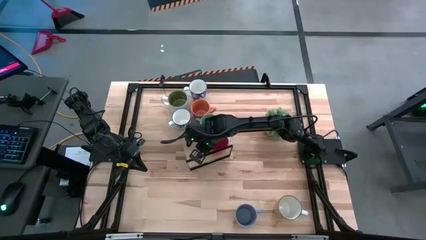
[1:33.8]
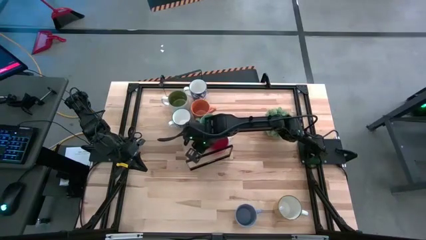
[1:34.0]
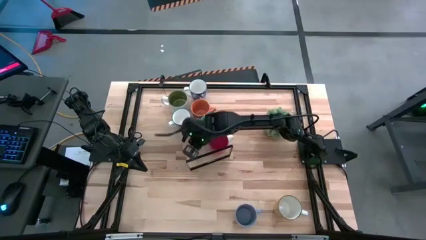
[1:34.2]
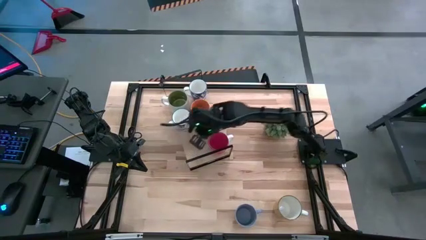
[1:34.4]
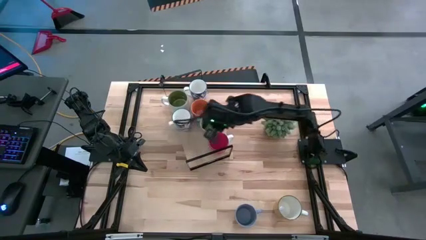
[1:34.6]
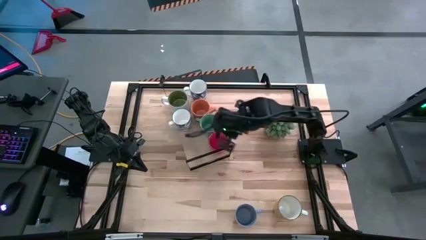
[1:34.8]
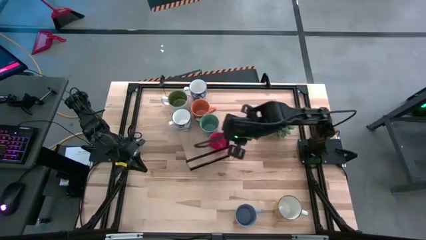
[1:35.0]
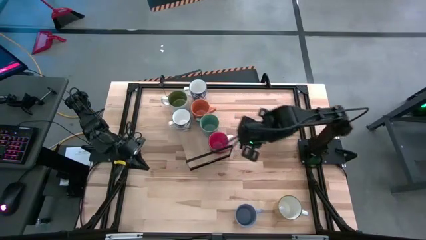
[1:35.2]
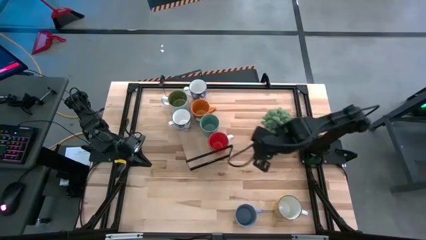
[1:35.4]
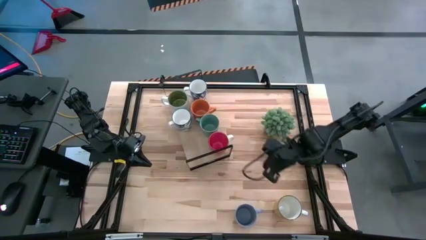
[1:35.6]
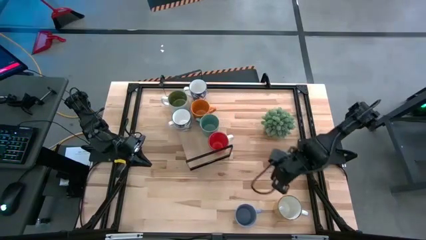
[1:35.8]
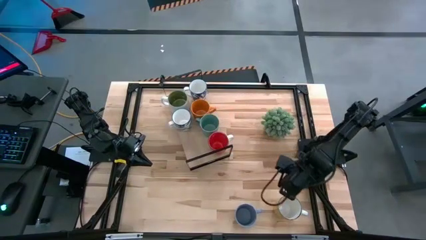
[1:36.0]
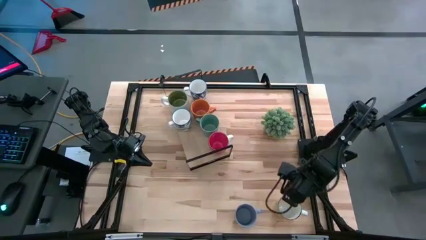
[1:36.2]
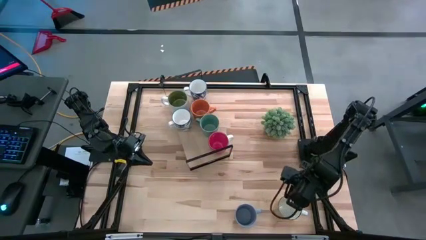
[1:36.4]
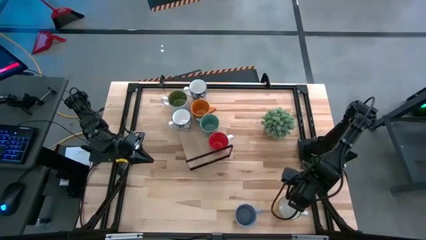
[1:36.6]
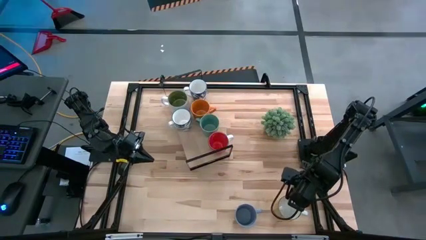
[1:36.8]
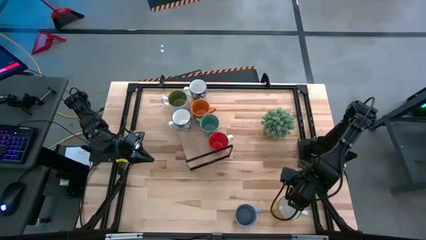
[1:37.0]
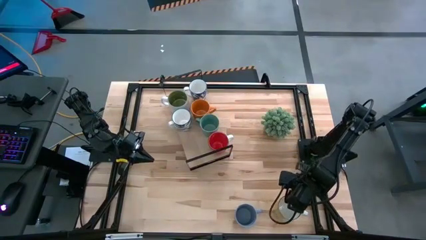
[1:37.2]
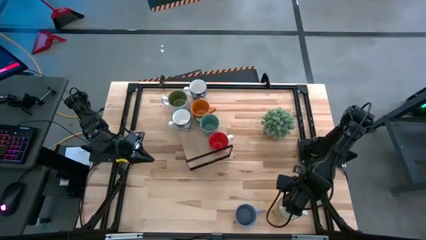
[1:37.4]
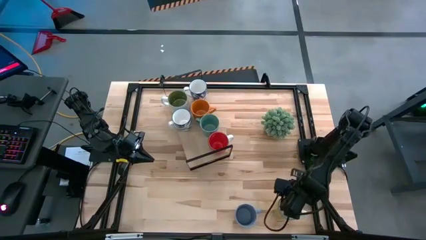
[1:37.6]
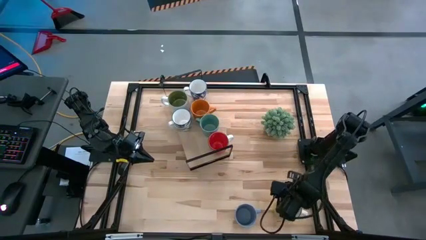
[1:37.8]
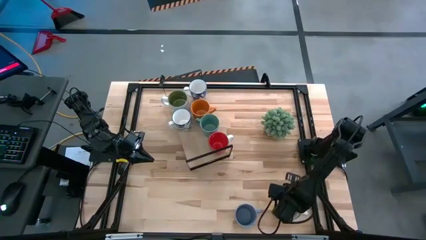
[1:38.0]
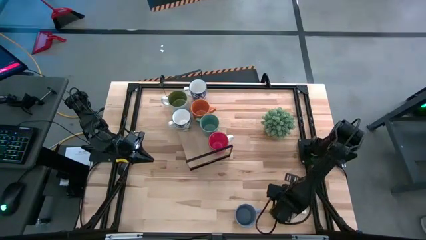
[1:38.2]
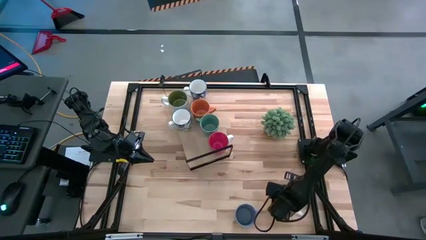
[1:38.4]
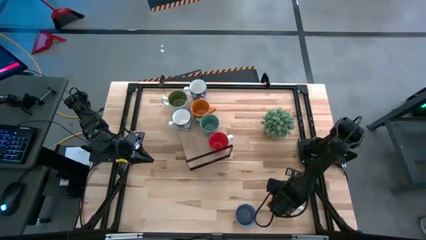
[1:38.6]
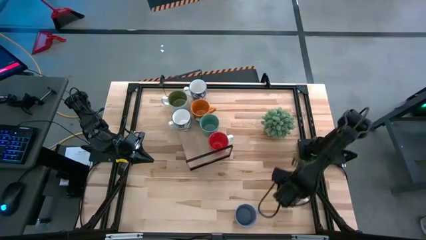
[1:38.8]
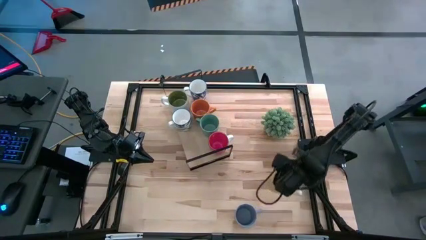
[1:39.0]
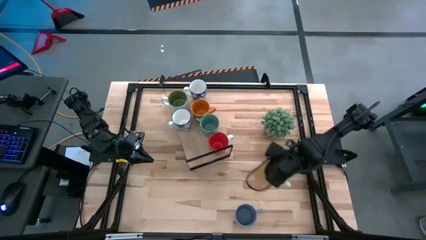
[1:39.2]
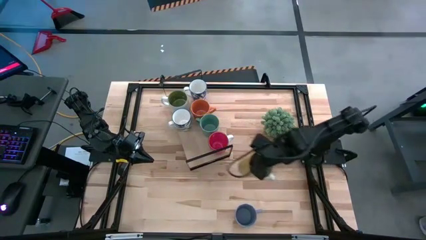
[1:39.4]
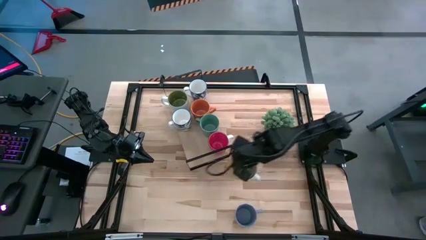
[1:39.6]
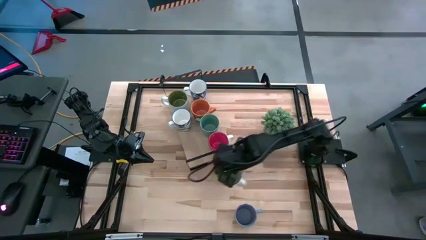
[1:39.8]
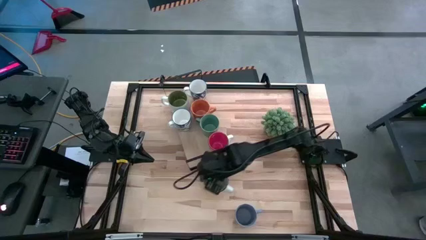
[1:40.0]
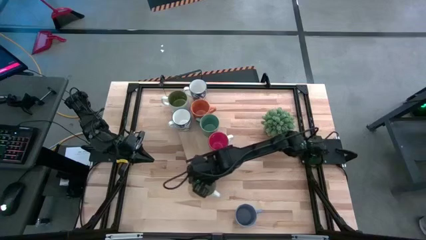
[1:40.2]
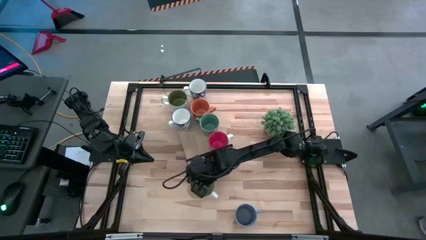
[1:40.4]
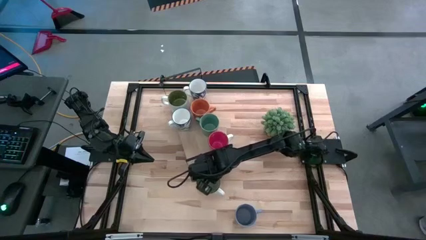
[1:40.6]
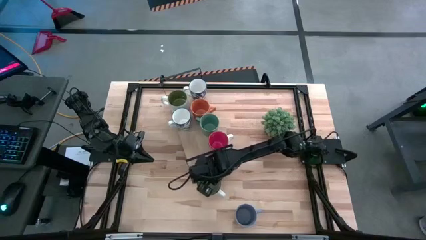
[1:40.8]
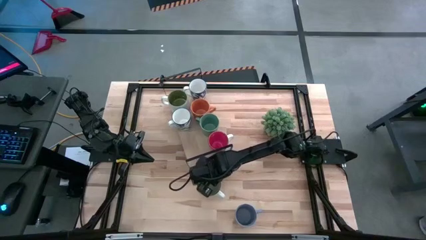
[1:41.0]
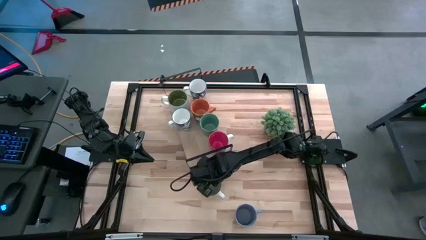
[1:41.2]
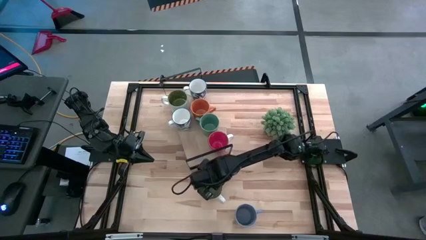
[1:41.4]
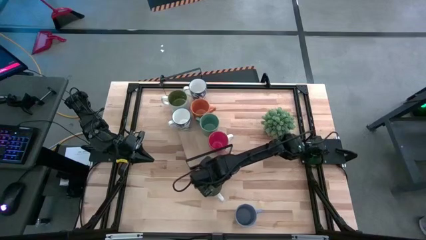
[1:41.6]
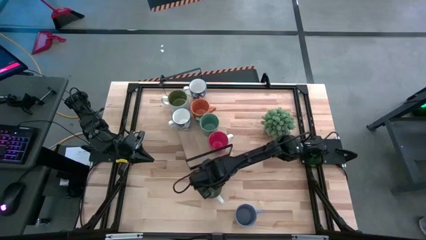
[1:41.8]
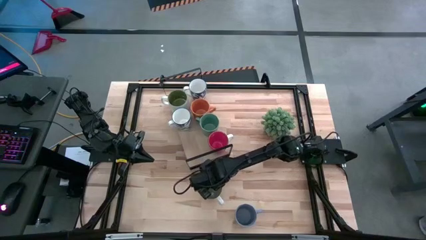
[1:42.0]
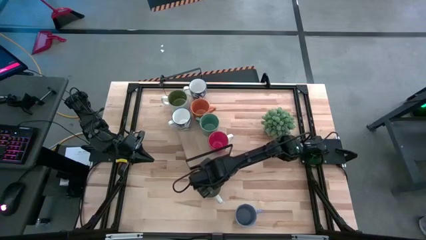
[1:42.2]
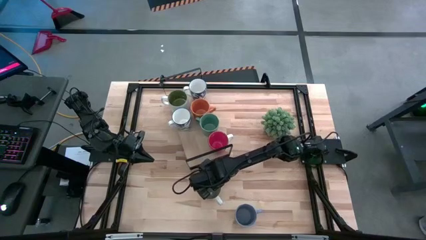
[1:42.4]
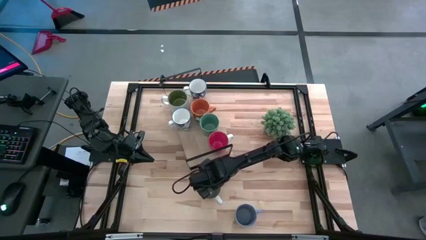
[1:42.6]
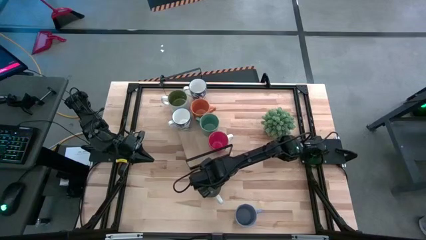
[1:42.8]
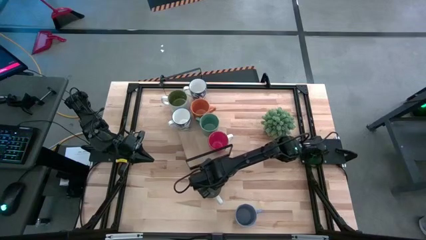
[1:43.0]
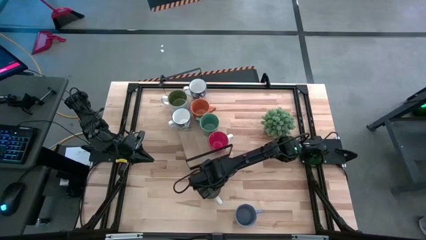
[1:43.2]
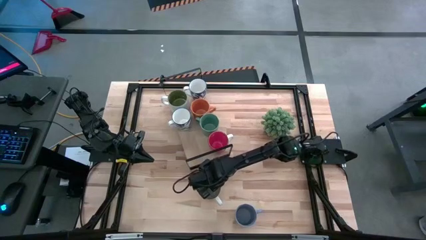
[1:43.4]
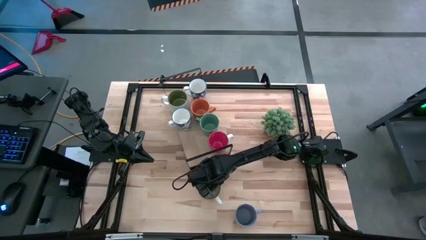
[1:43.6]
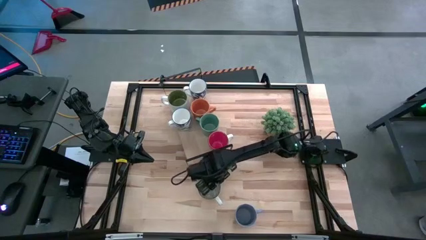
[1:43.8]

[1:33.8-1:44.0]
Task: Place coffee mugs
Move the yellow mug to the bottom center

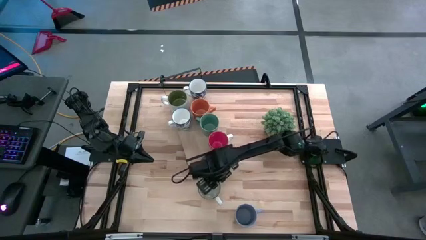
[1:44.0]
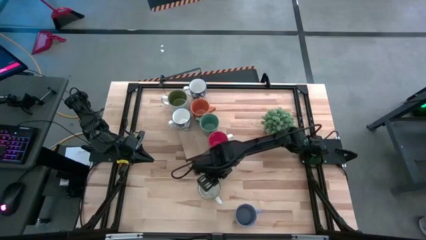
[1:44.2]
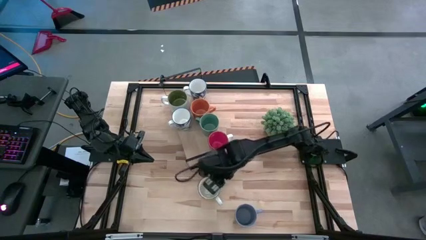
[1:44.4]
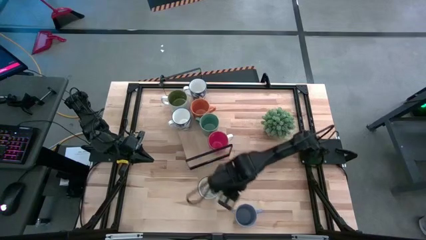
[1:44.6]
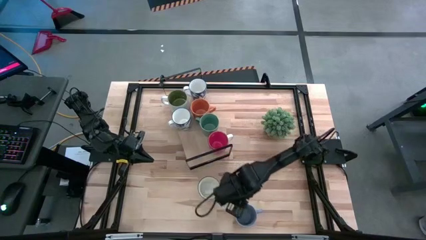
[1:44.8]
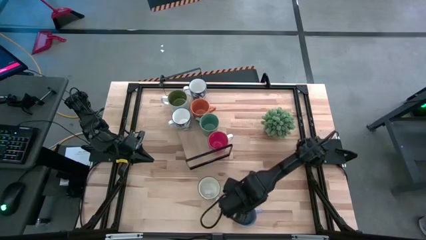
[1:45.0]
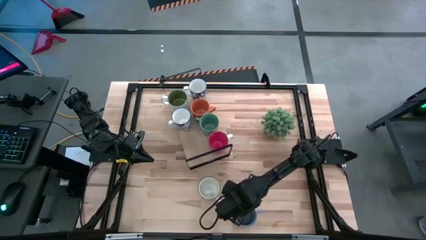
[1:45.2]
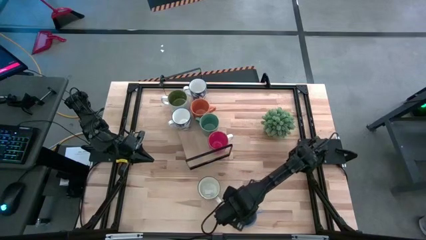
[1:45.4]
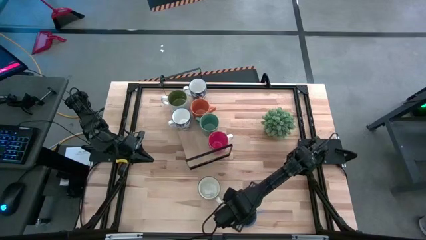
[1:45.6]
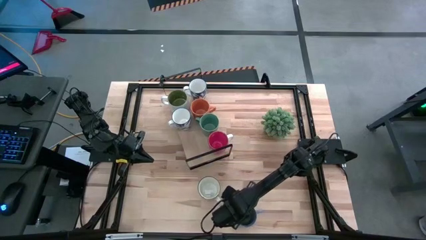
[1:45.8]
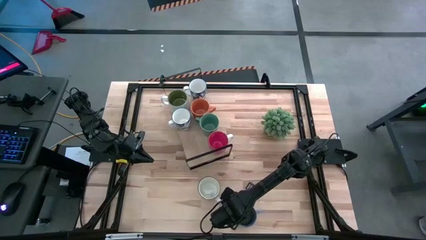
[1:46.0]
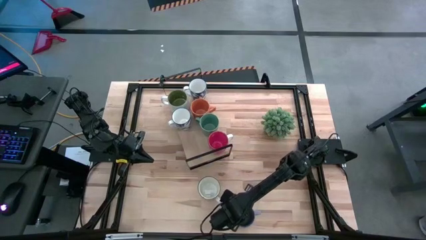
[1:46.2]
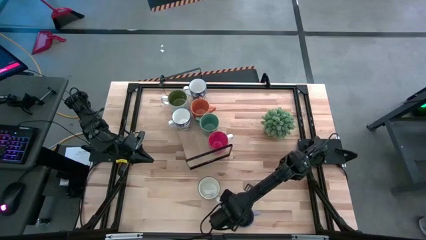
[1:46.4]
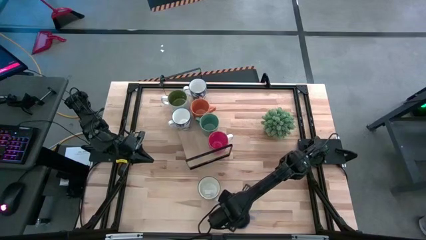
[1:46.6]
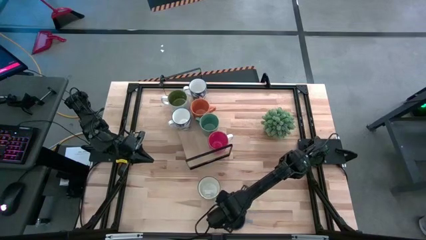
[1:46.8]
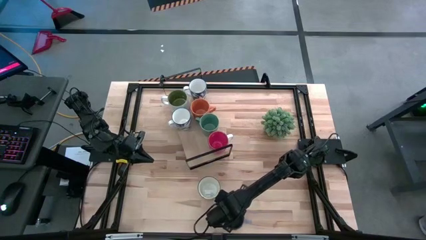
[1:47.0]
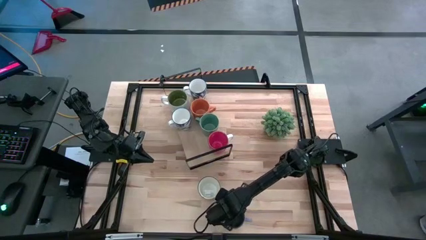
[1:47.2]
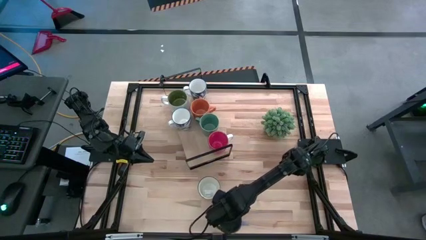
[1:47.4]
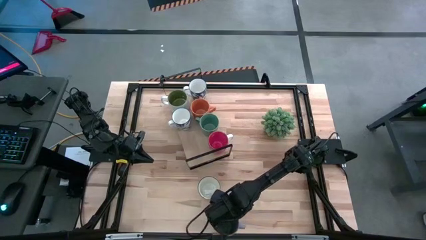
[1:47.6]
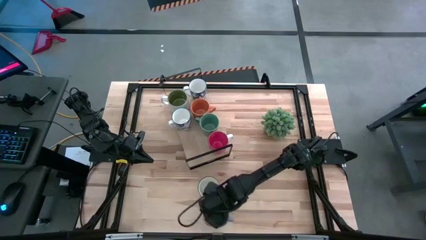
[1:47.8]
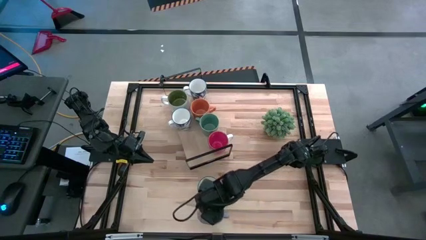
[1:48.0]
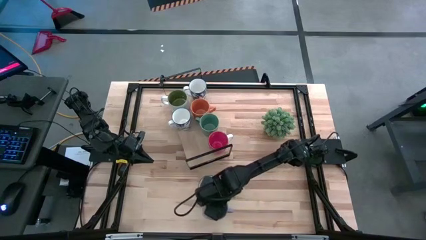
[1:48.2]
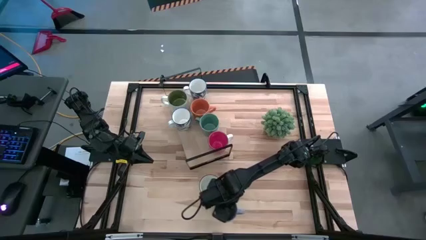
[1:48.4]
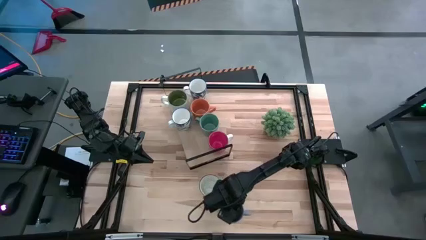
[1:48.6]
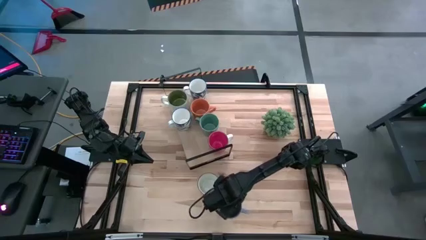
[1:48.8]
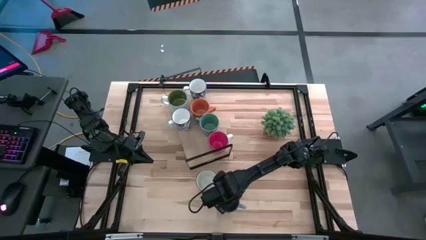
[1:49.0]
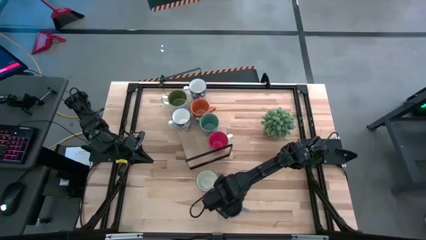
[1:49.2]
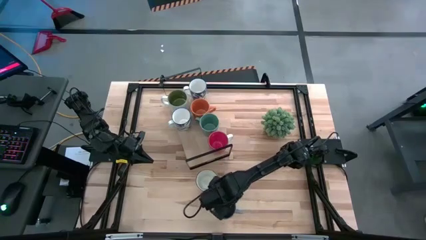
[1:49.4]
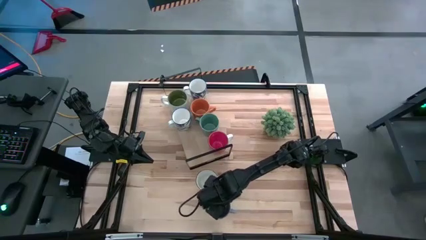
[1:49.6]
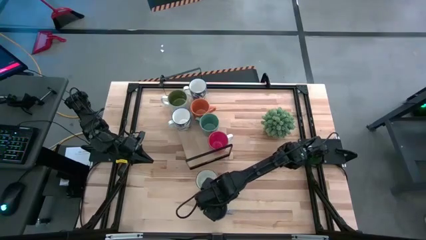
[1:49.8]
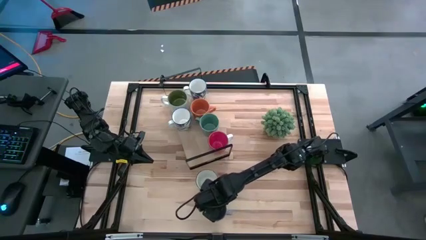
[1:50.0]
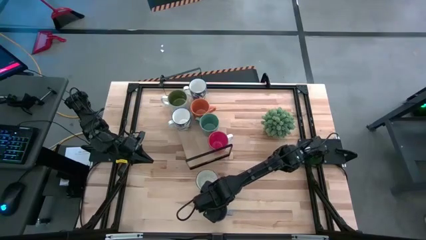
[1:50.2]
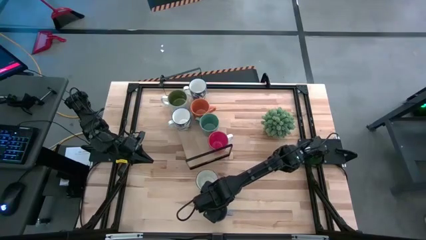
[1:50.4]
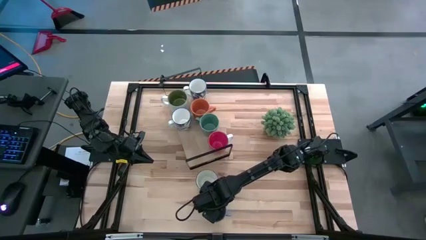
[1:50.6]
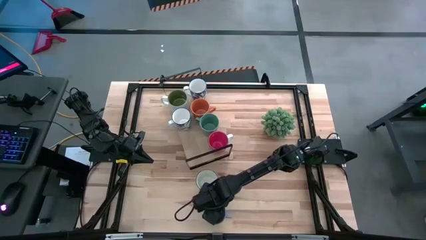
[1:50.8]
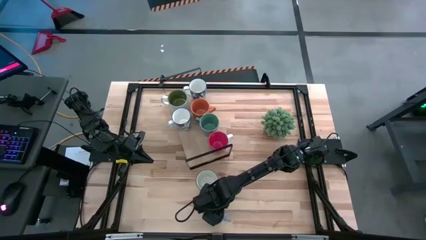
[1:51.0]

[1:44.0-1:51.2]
Move the blue mug to the bottom center
